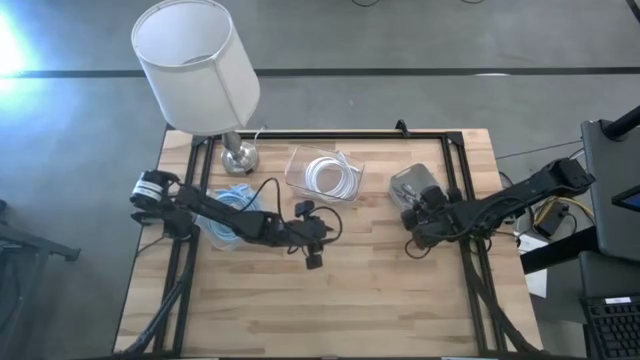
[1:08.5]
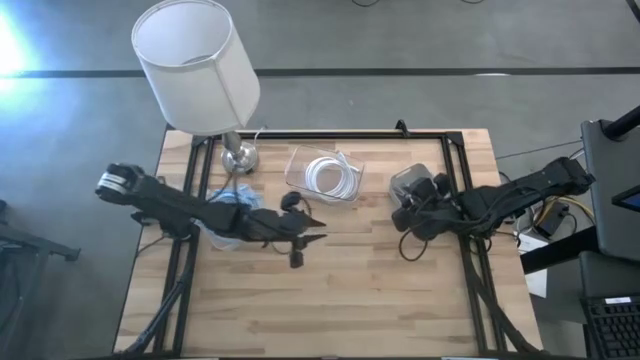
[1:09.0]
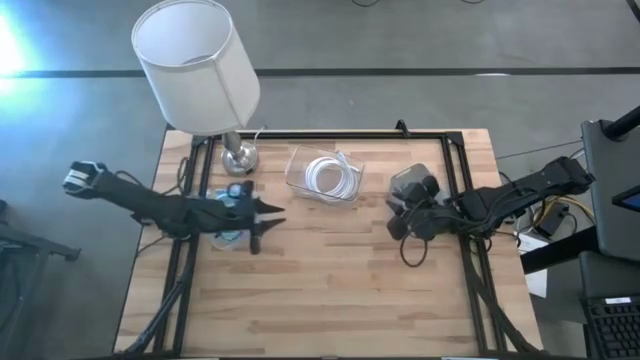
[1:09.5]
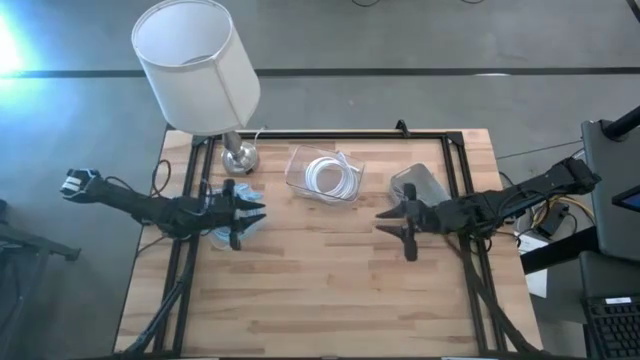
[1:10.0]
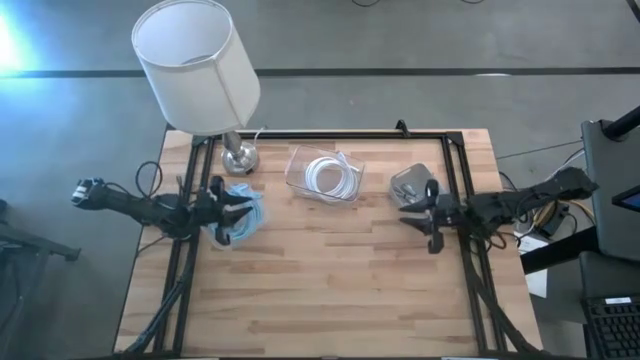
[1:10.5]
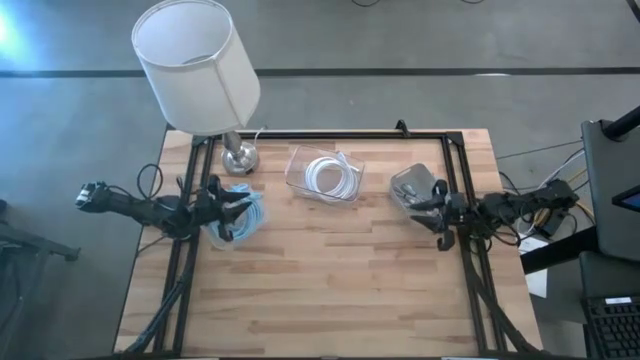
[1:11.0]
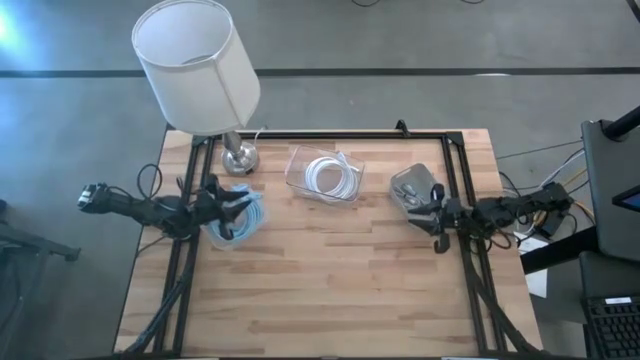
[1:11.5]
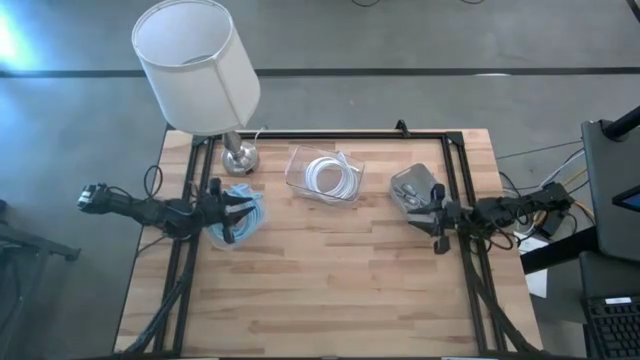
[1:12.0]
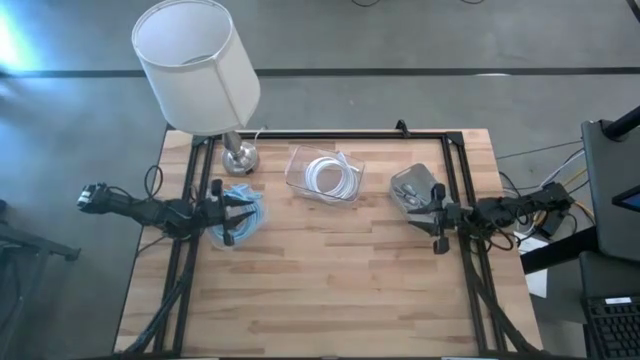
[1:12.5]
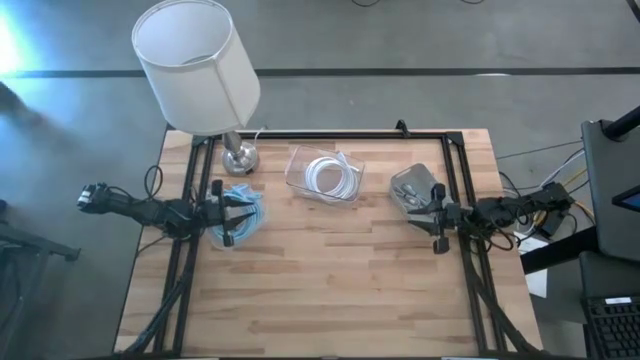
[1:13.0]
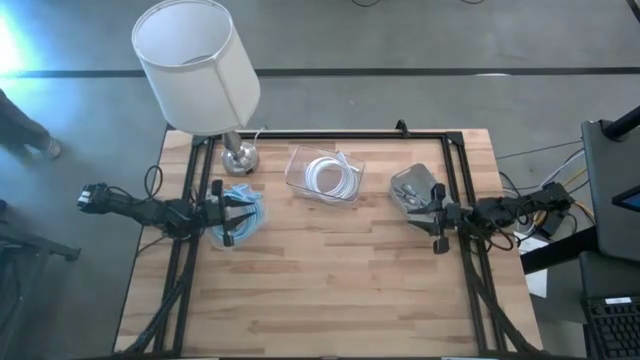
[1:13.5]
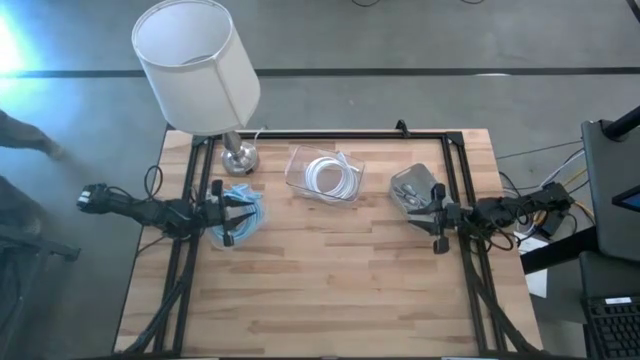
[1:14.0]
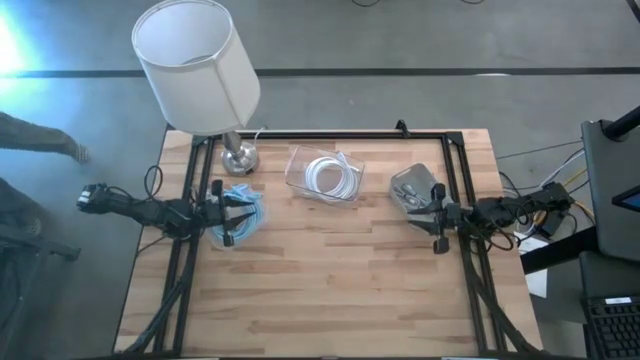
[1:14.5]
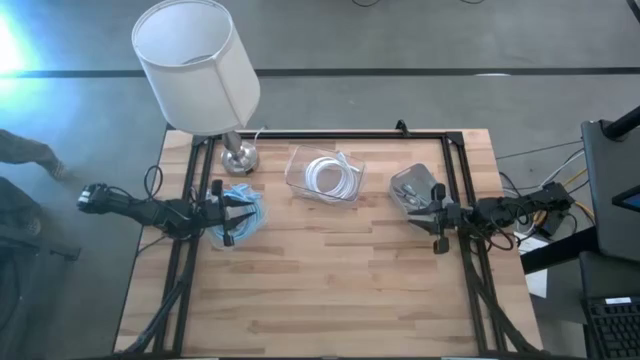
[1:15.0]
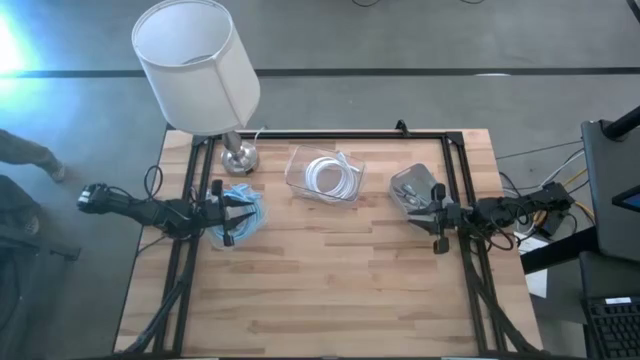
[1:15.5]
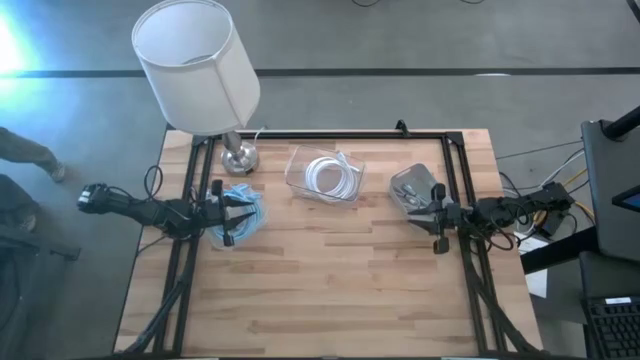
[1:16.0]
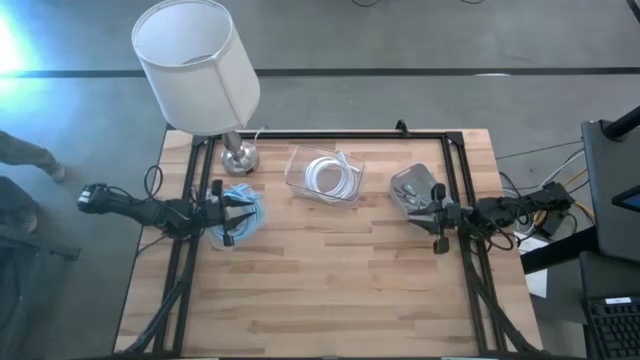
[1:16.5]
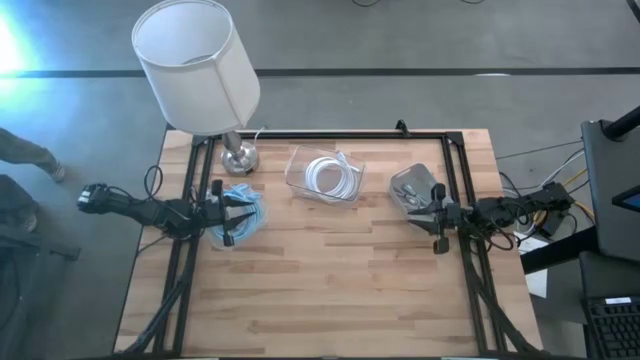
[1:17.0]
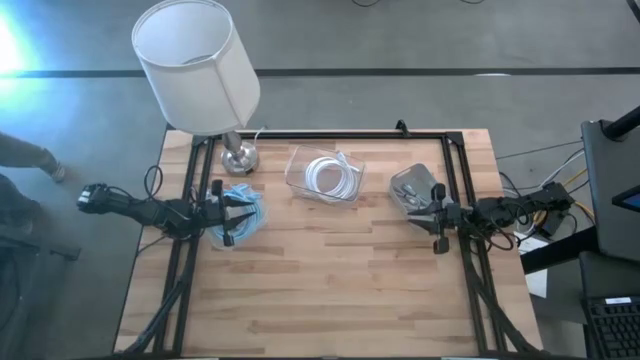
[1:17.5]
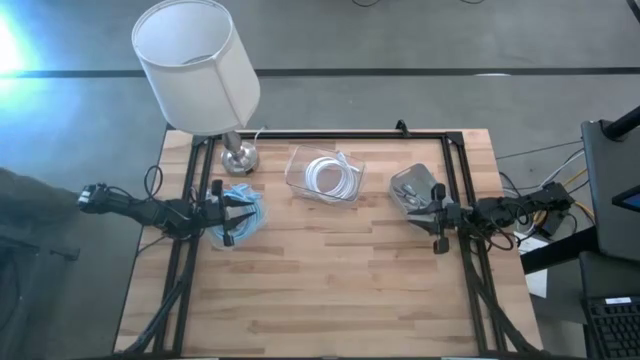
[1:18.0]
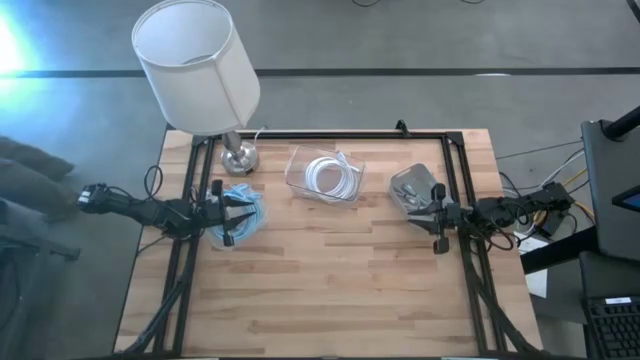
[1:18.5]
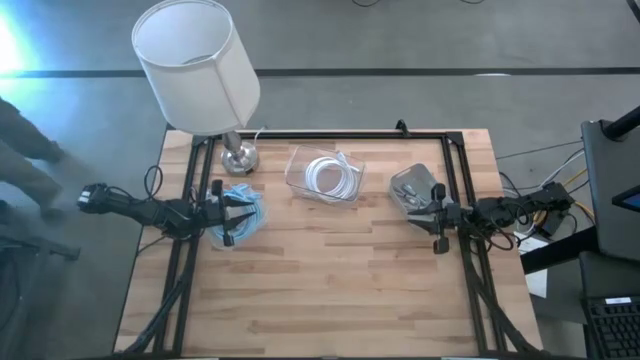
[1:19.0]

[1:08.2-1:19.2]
Task: Pick & Place USB Port
Return to home position

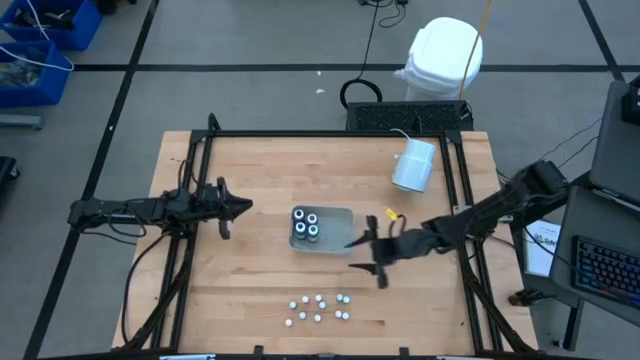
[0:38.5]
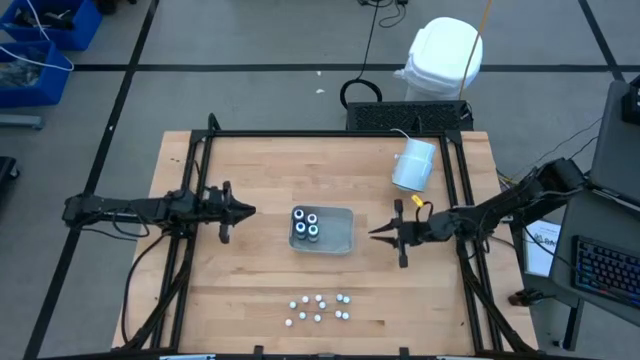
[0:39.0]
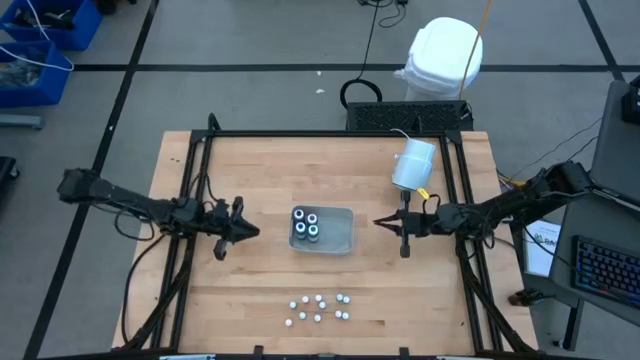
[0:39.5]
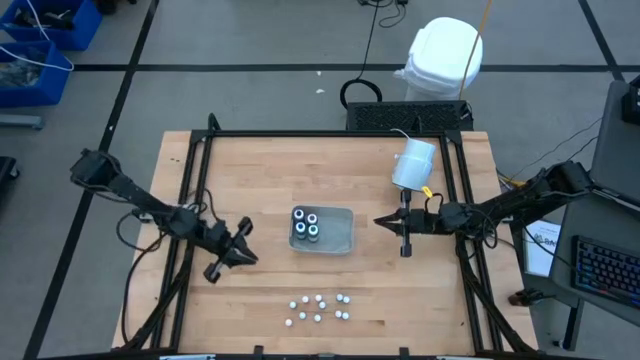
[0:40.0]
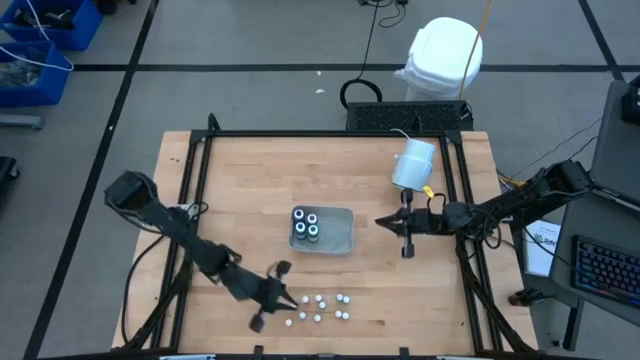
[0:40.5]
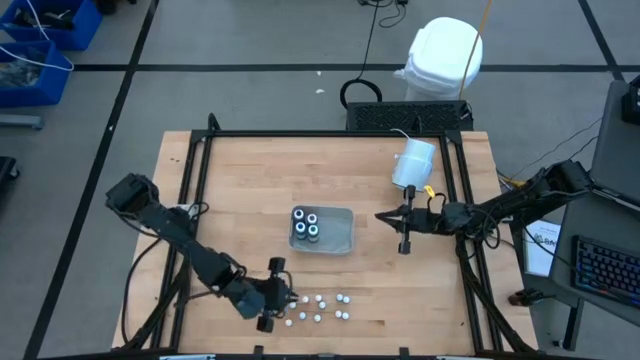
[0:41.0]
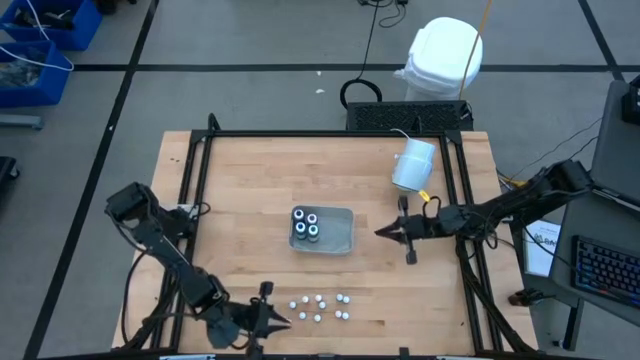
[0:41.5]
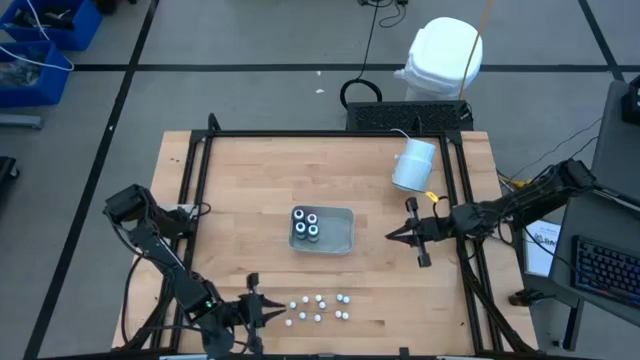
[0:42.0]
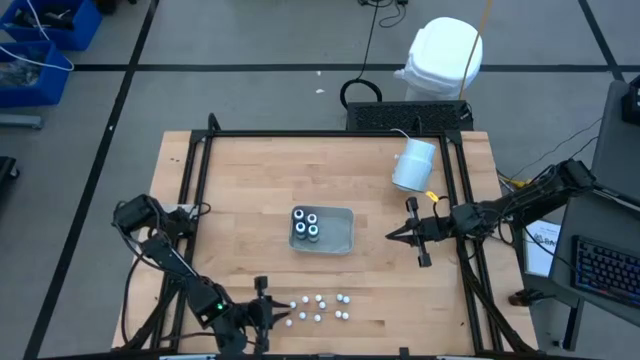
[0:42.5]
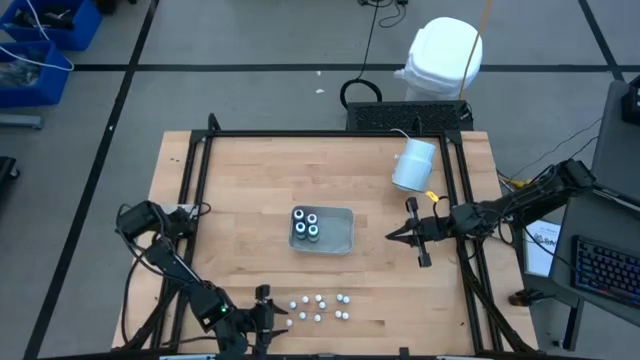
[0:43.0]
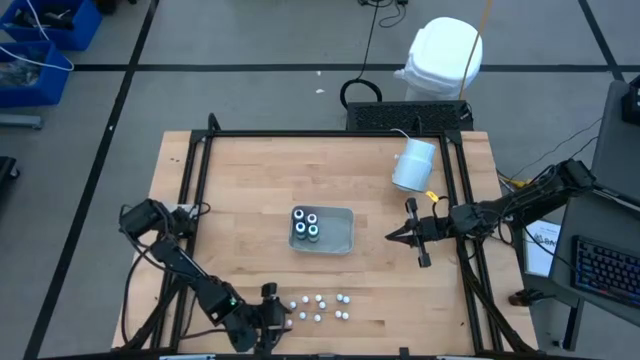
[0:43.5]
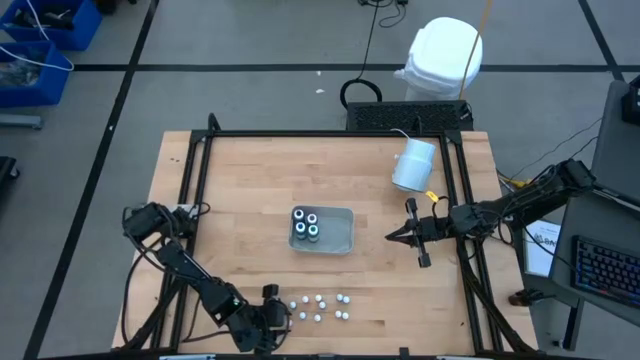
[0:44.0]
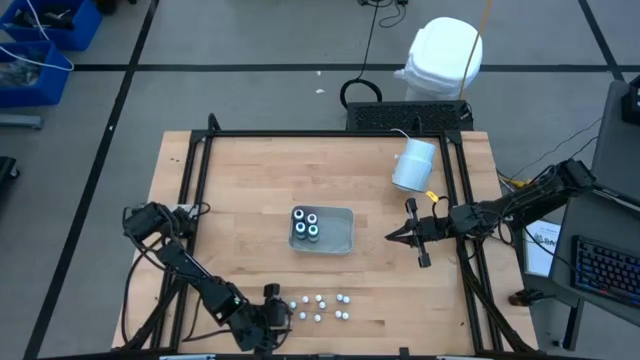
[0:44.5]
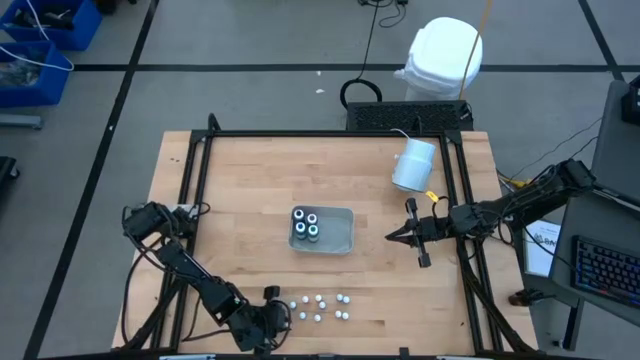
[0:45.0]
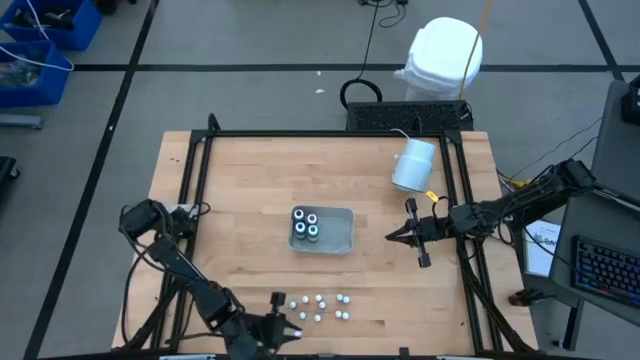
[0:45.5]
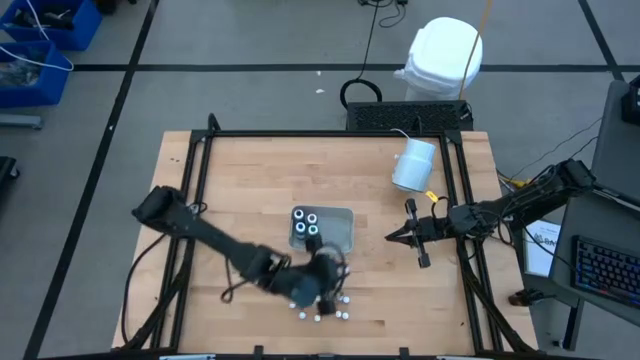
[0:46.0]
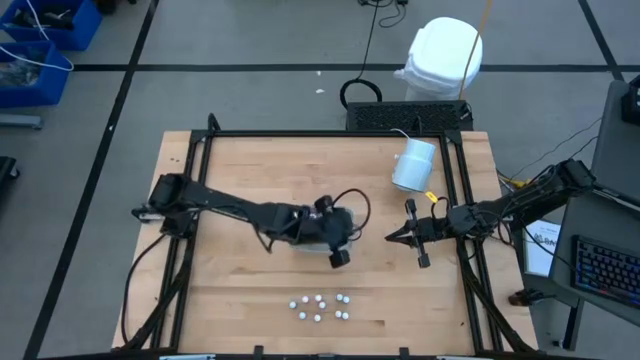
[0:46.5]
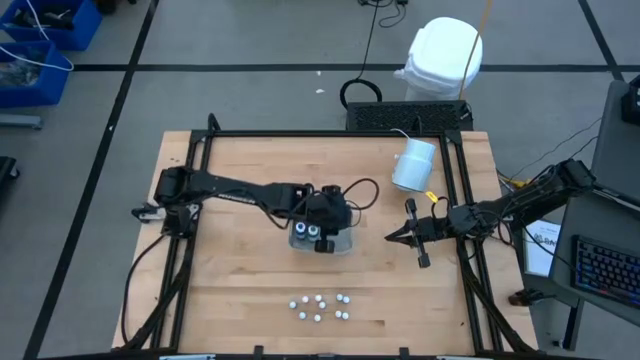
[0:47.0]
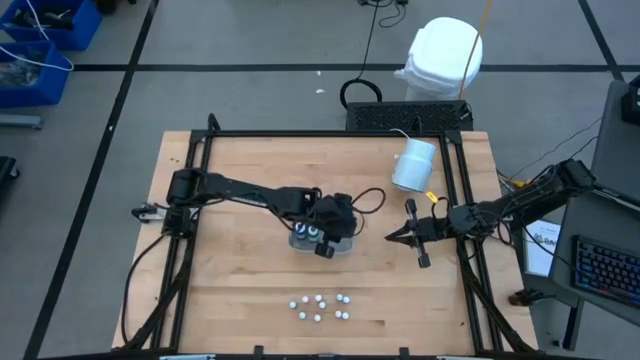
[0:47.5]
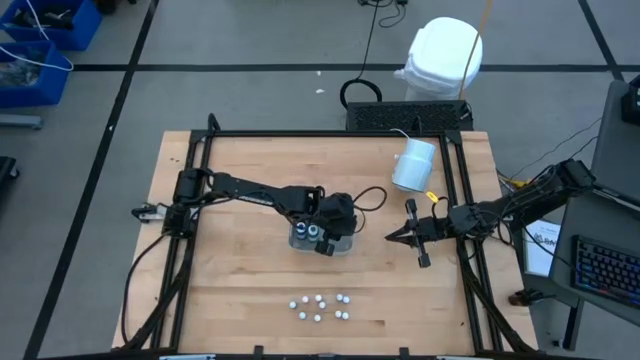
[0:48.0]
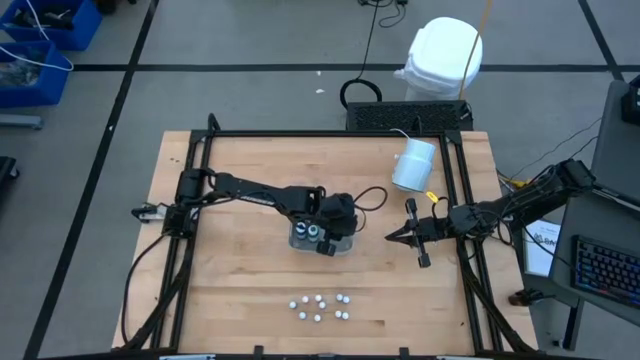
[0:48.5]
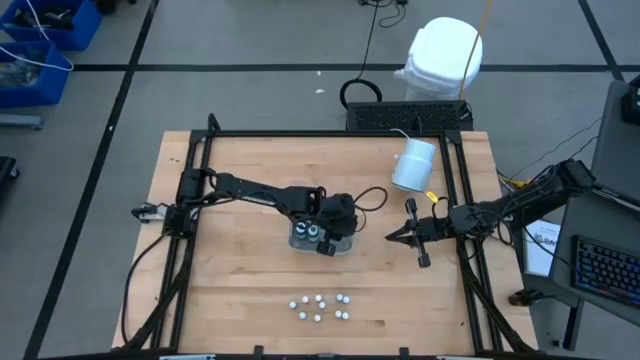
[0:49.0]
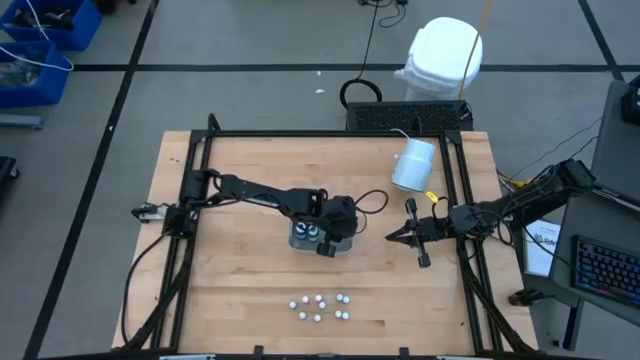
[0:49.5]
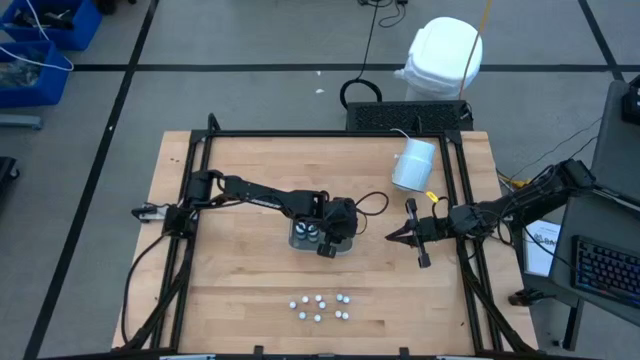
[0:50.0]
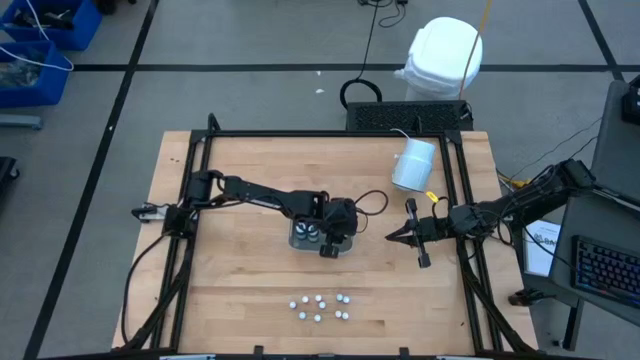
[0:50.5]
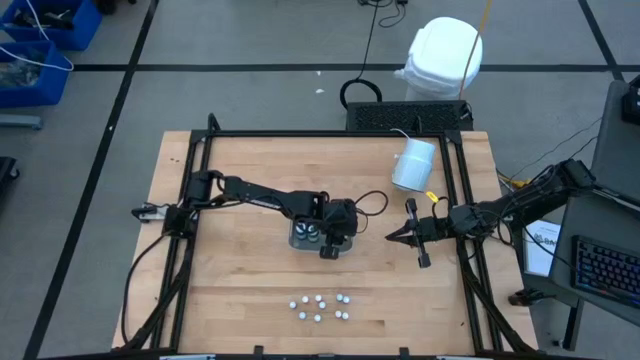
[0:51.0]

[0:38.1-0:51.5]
Task: Pick & Place food coloring
Put the small yellow bottle into the gray bin
